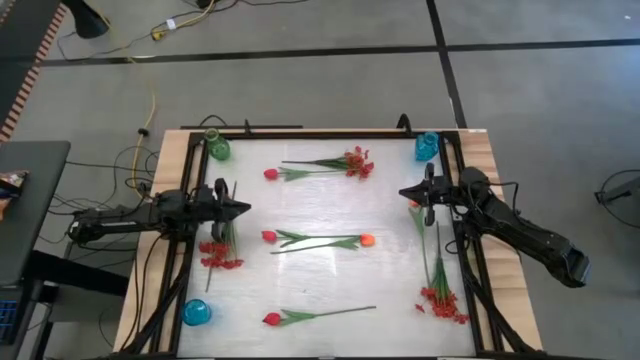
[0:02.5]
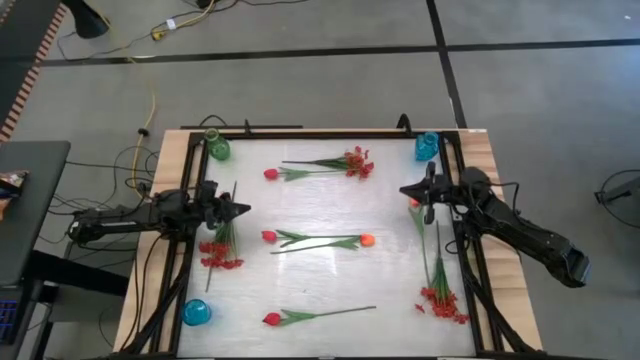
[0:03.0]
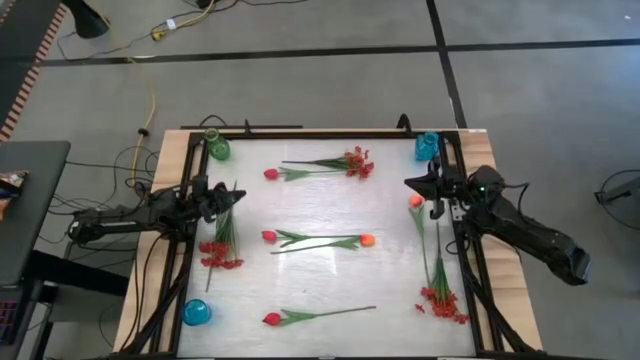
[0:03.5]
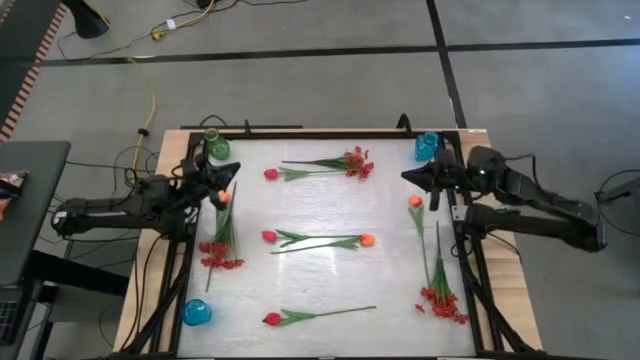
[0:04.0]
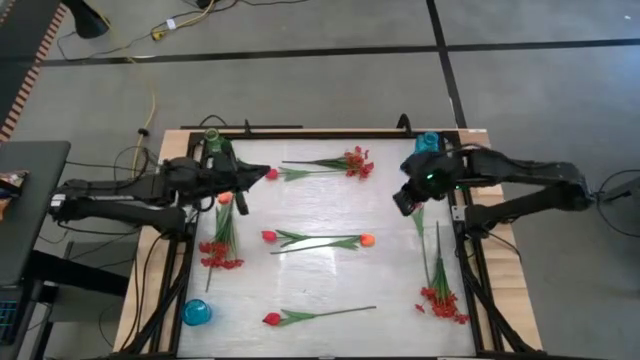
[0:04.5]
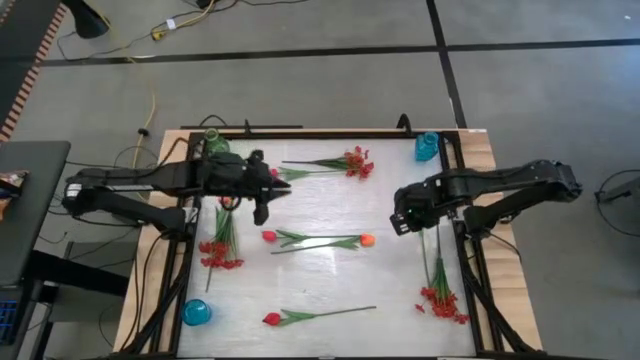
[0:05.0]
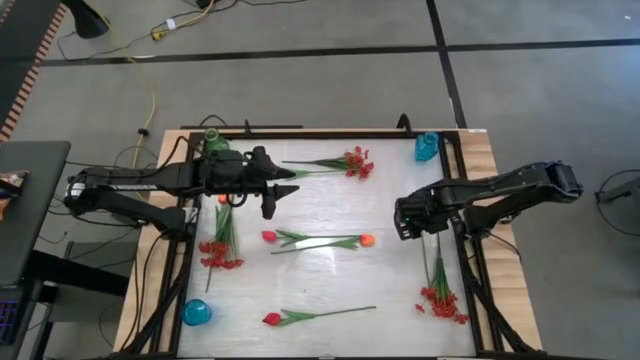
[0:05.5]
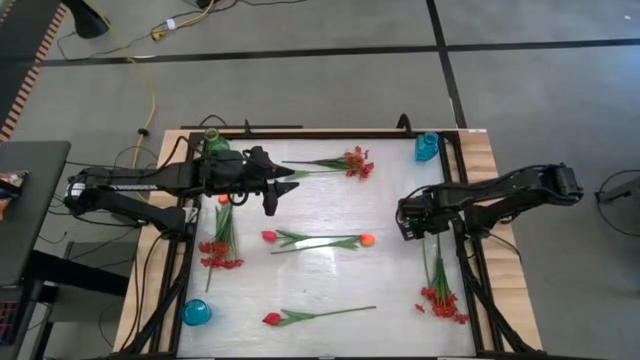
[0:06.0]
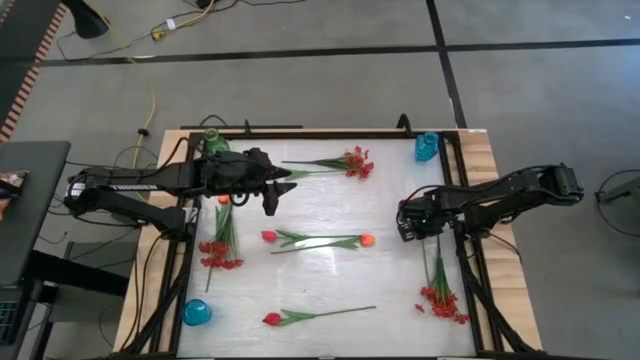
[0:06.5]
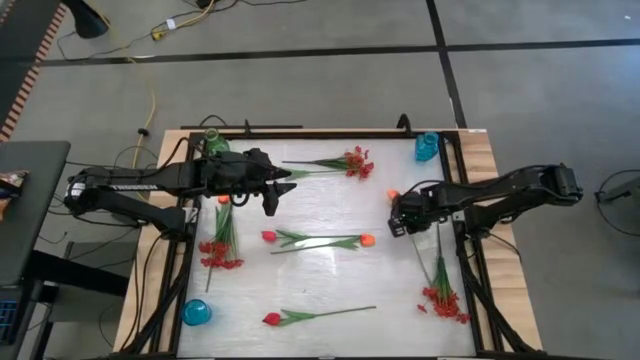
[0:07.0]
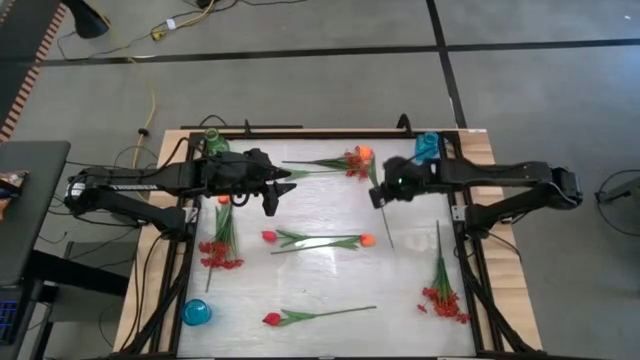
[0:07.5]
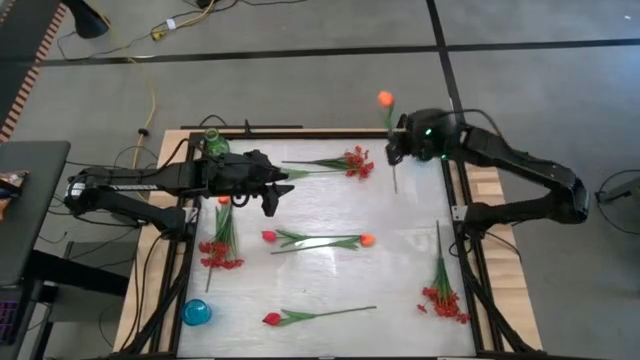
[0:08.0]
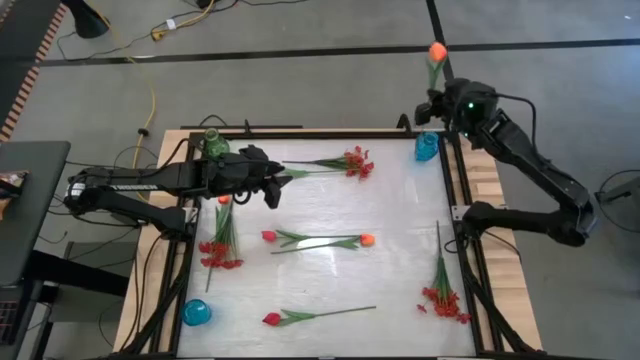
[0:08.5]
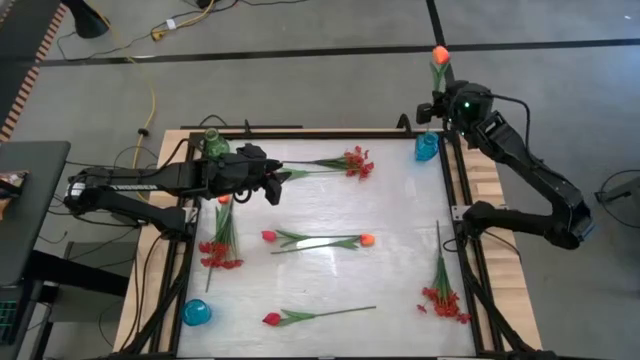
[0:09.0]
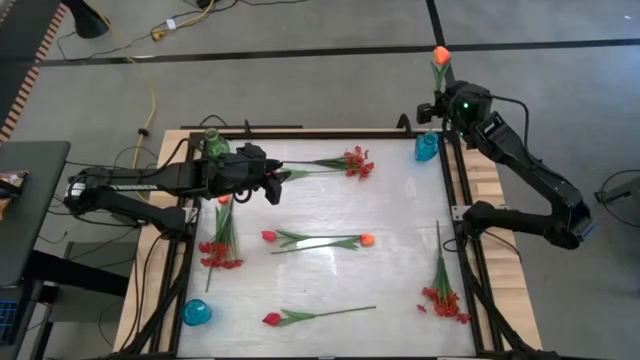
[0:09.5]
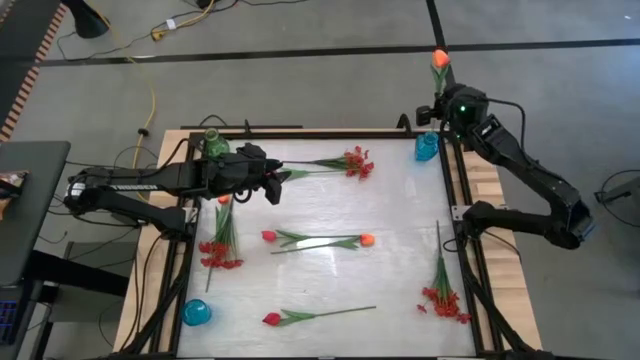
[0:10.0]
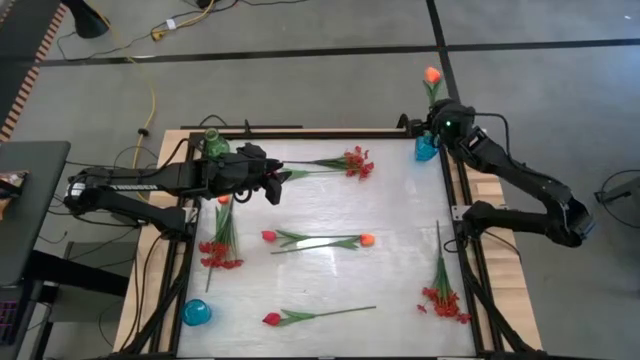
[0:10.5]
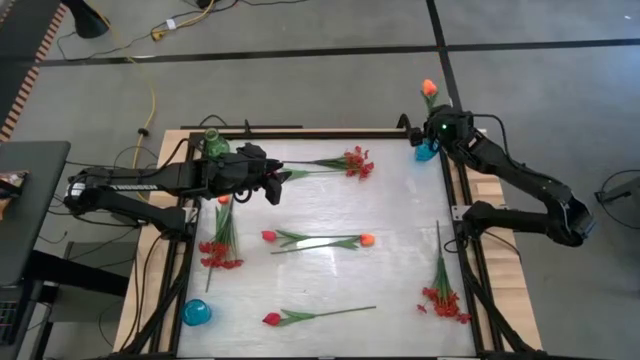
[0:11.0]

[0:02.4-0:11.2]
Task: Sort flowers into vase by color
Put the middle right orange tulip into the top blue vase

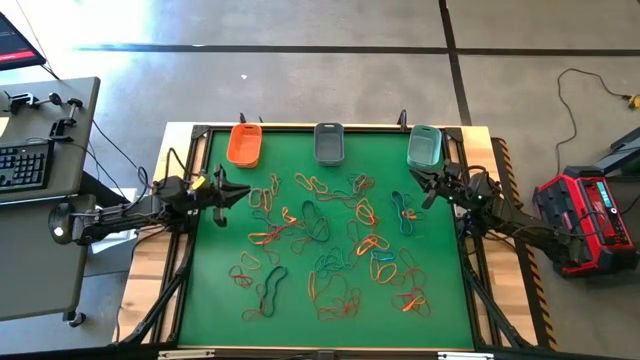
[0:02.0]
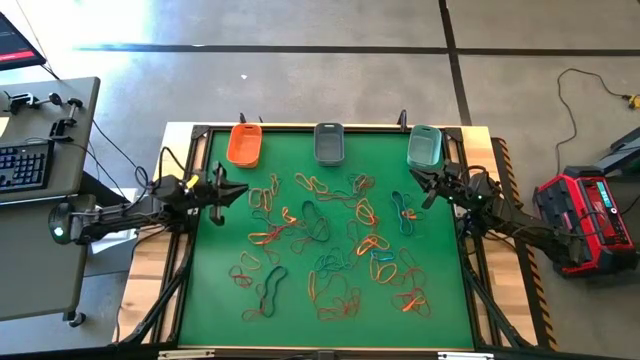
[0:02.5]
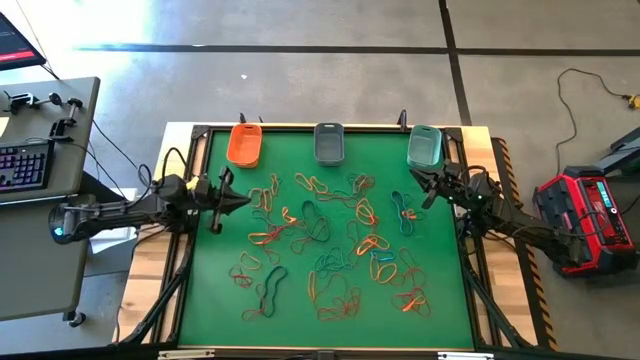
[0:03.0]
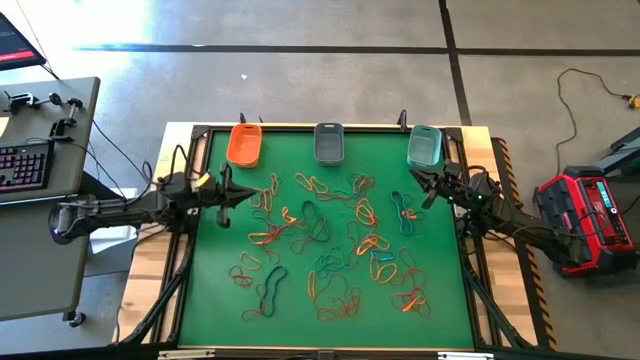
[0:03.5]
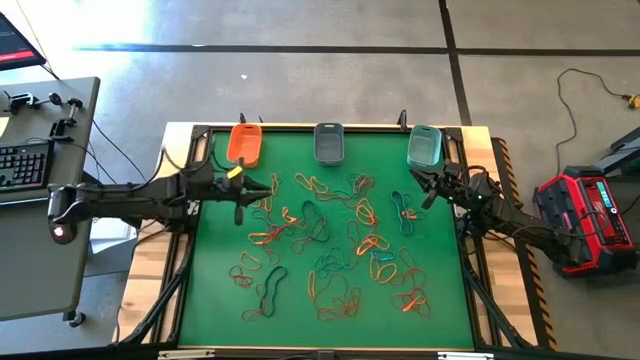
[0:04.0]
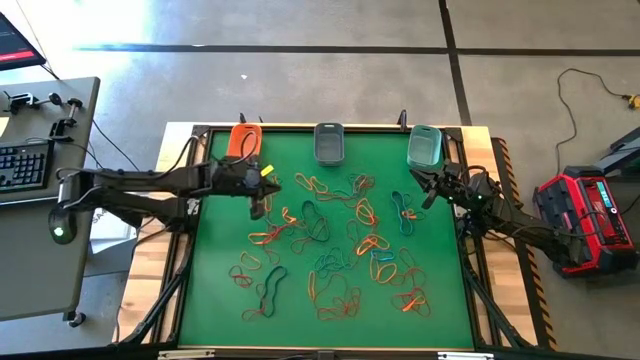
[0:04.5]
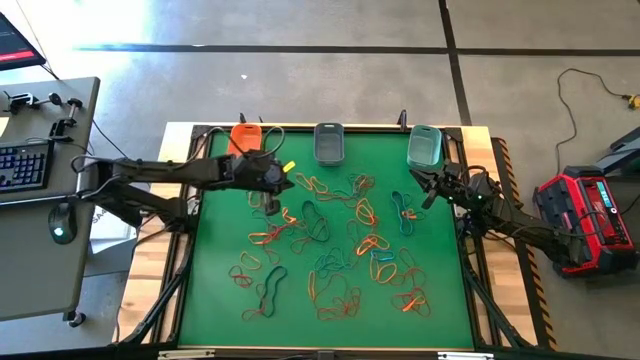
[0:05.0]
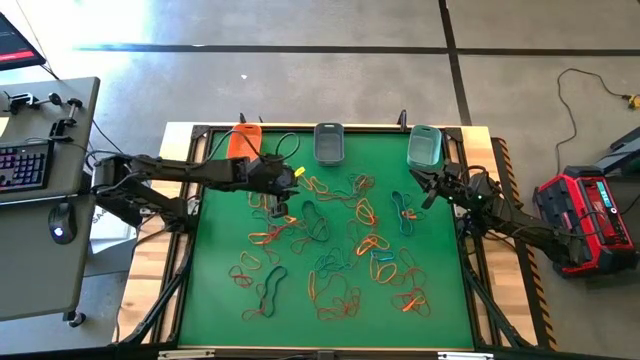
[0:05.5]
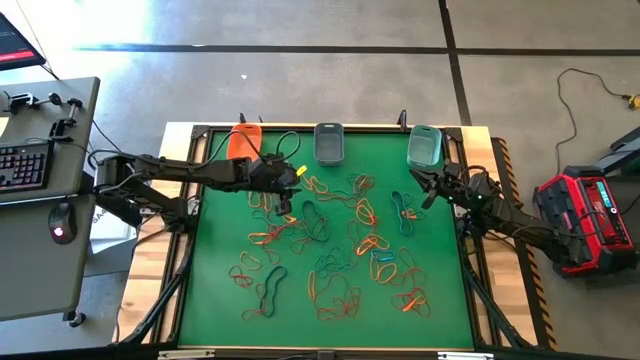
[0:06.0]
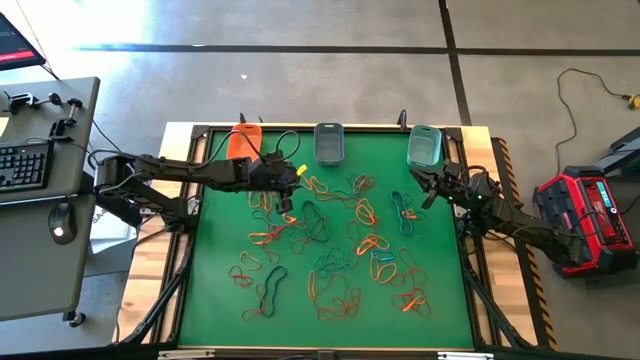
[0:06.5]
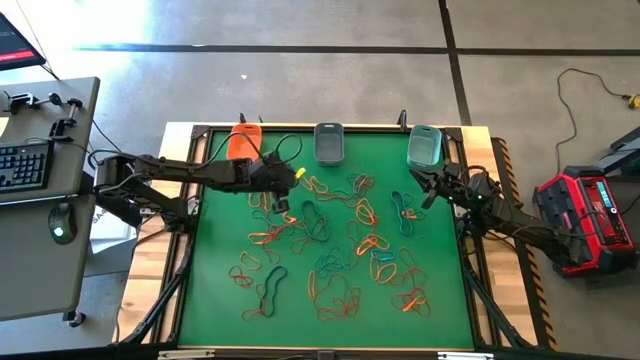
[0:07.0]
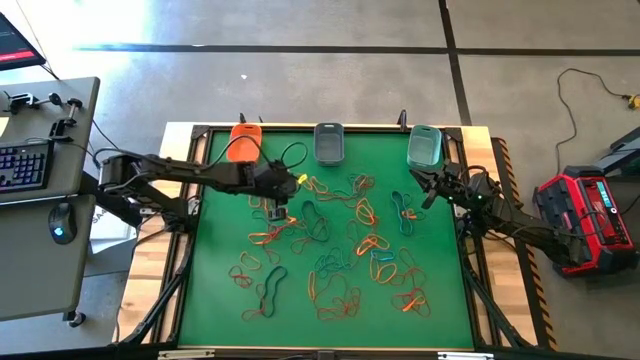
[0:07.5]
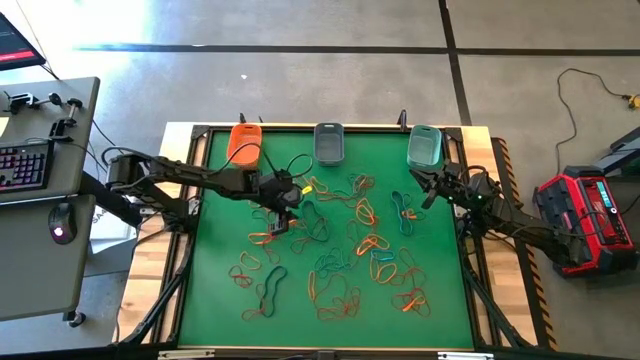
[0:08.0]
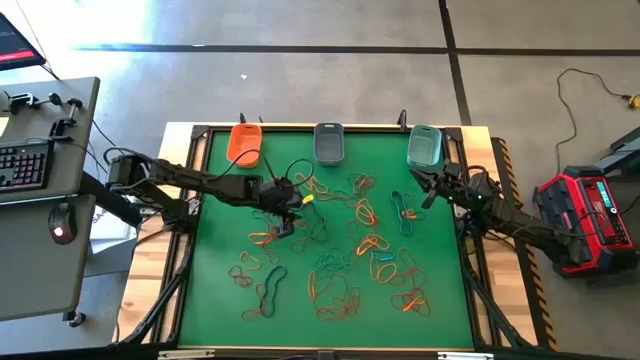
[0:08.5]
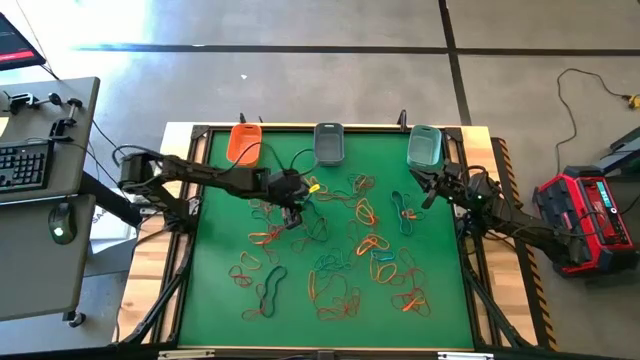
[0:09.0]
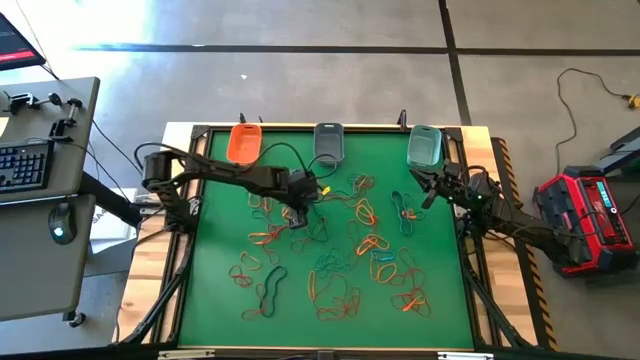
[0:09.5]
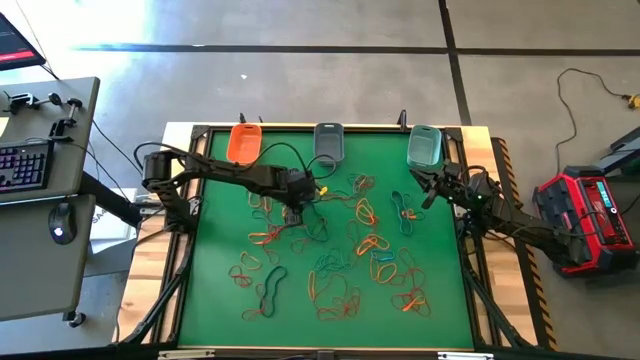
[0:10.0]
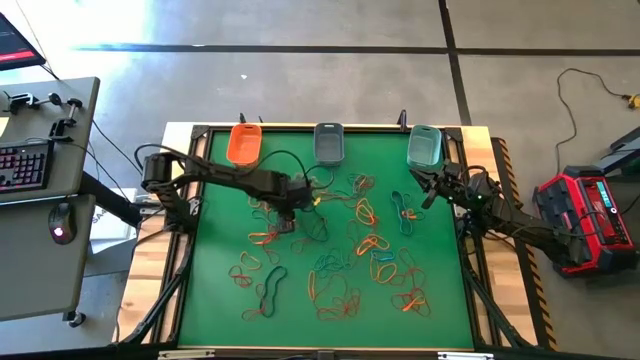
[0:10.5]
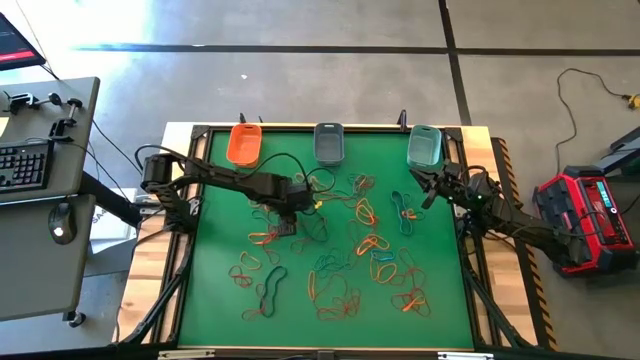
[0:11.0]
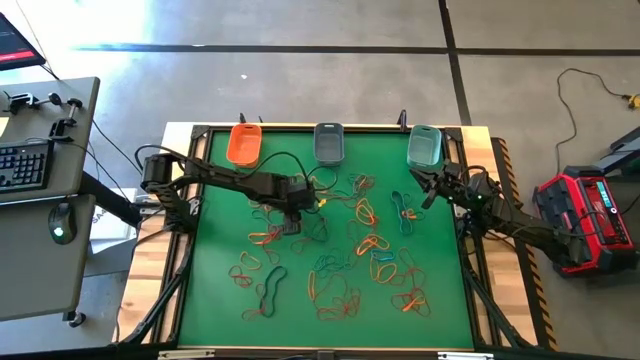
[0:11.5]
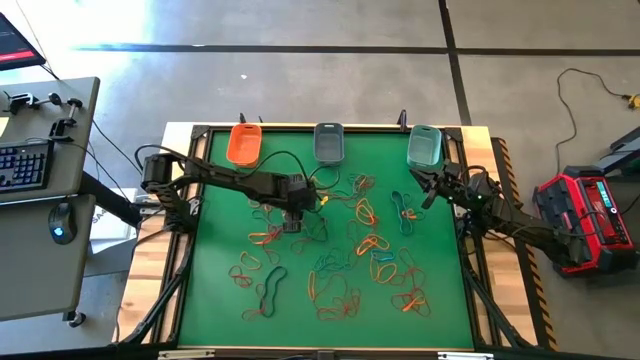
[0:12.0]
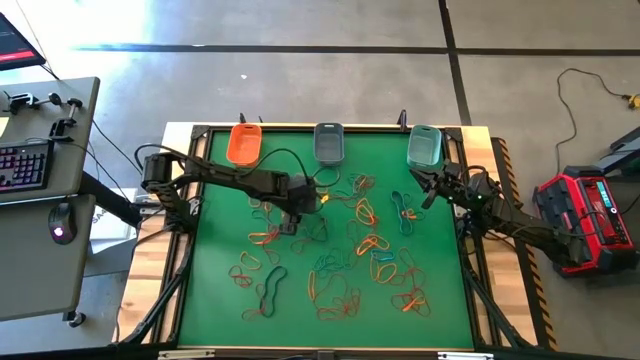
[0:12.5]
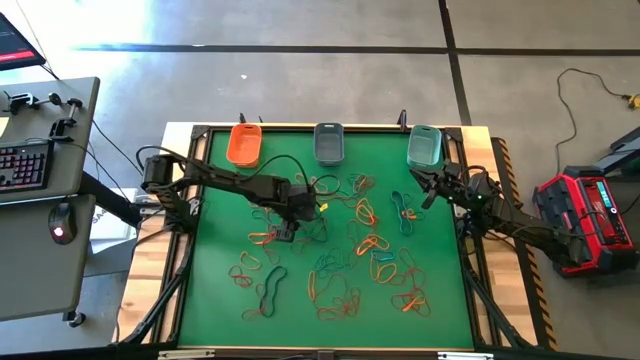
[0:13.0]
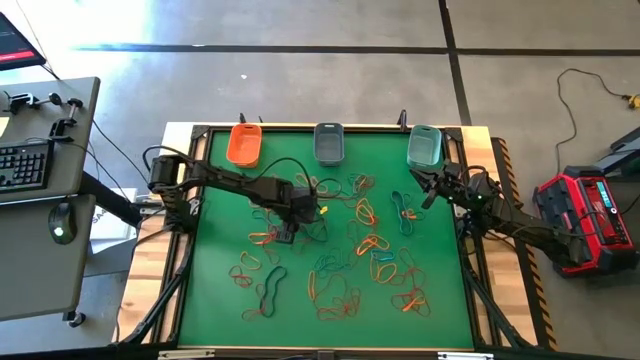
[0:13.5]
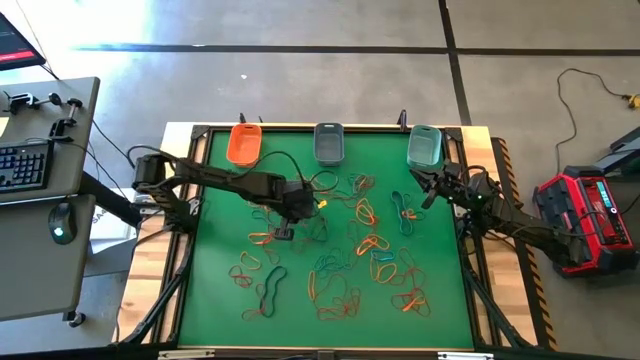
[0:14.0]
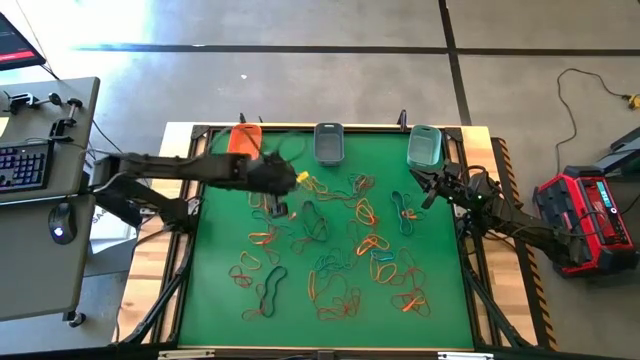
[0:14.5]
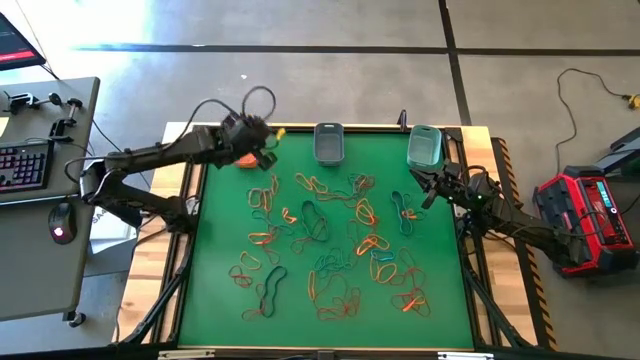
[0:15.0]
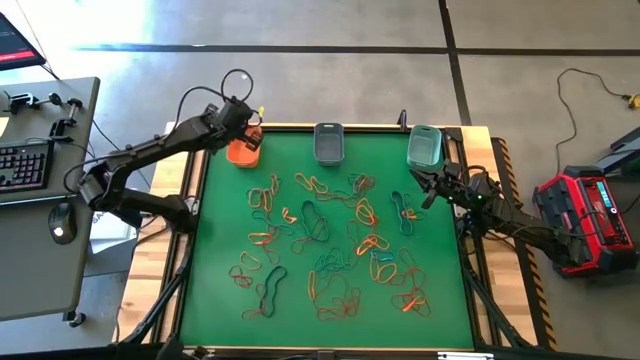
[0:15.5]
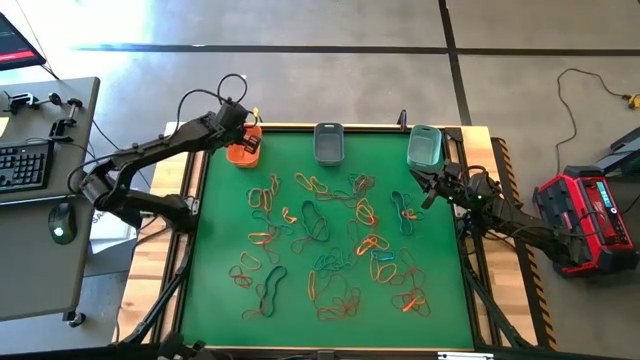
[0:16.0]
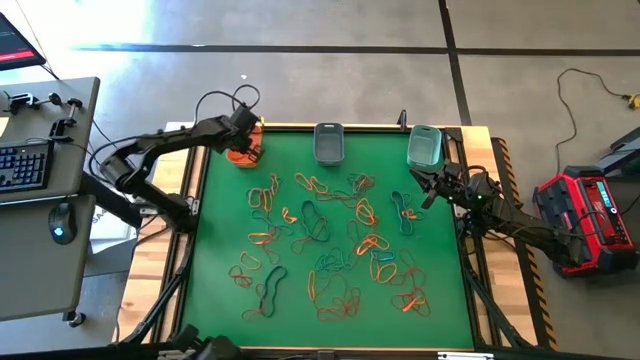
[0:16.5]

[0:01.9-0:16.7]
Task: Sort rubber bands into baskets
Put the red rubber band into the orange bin
